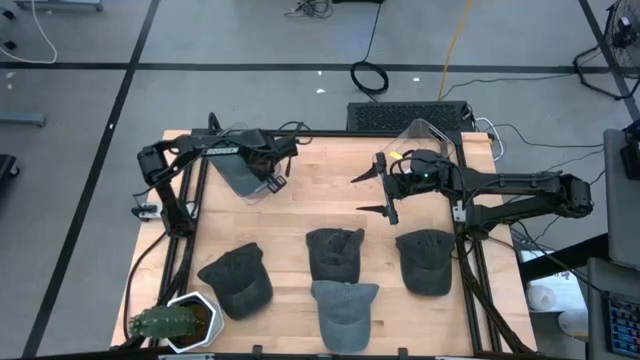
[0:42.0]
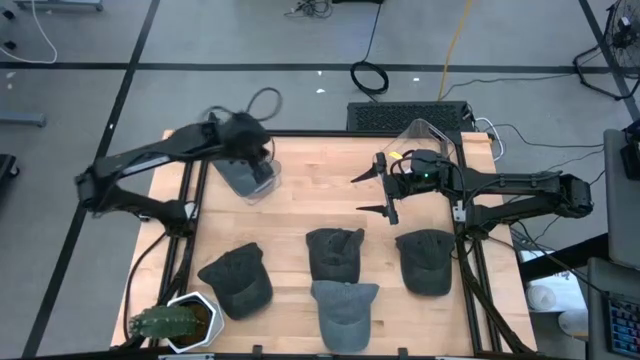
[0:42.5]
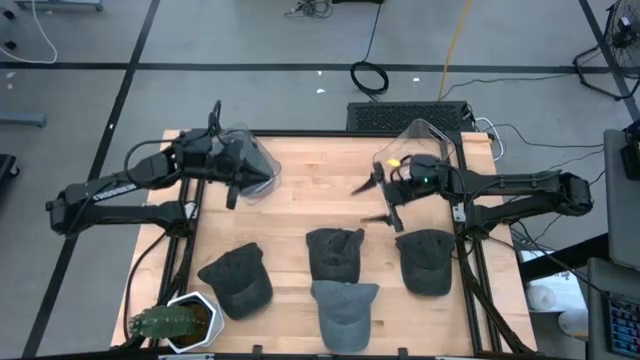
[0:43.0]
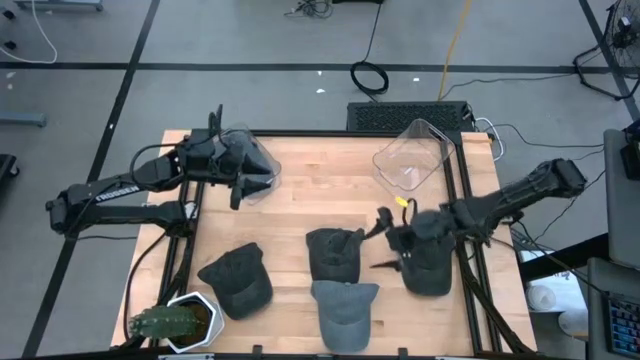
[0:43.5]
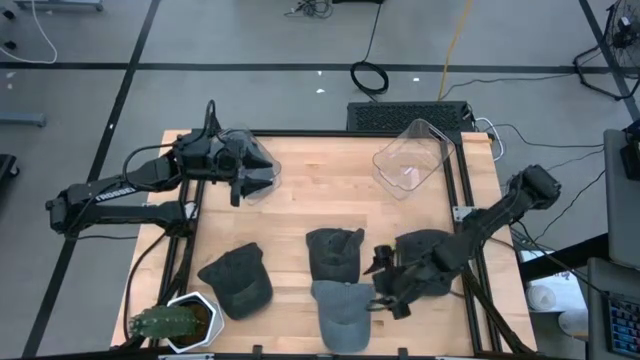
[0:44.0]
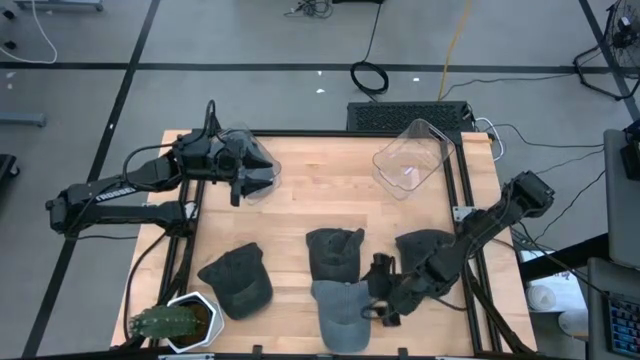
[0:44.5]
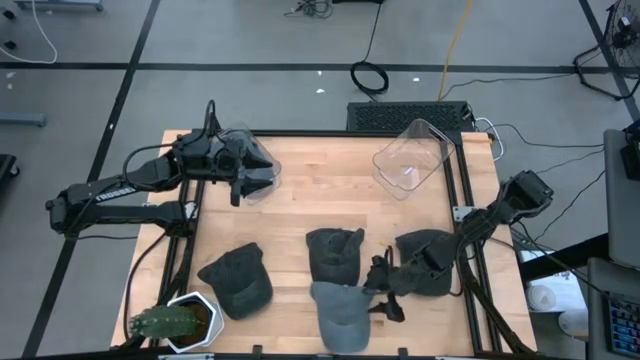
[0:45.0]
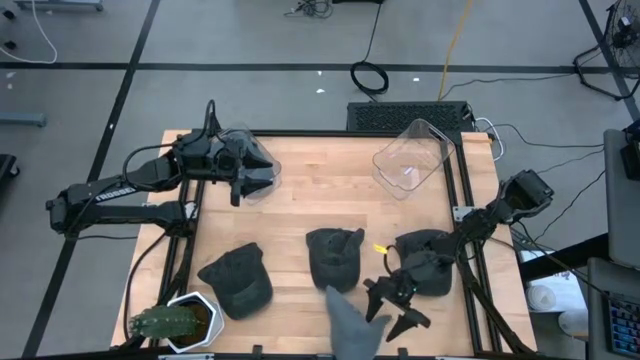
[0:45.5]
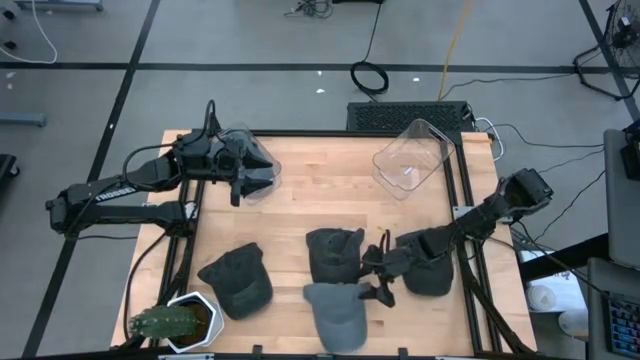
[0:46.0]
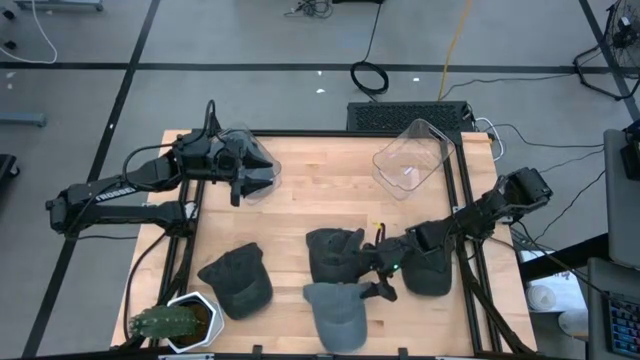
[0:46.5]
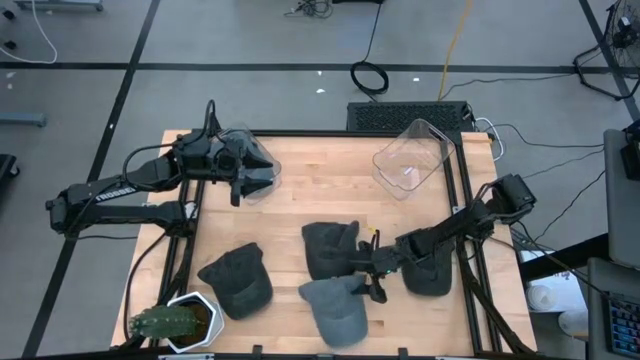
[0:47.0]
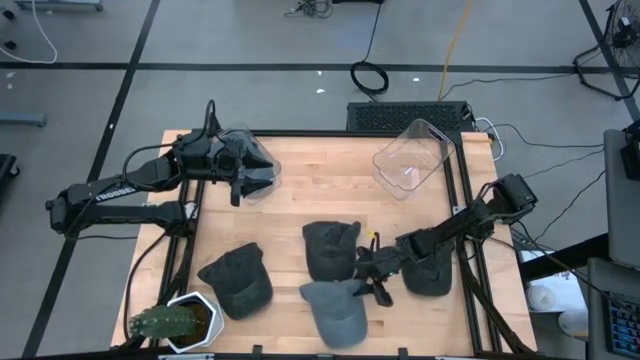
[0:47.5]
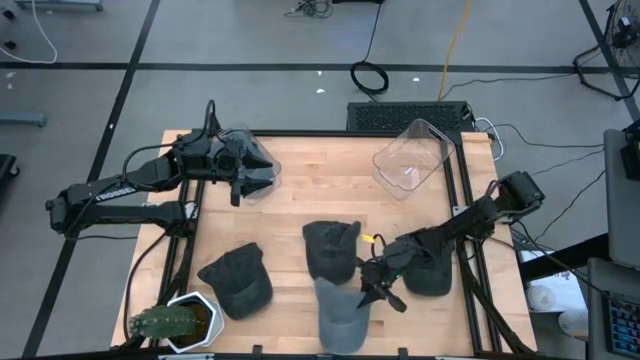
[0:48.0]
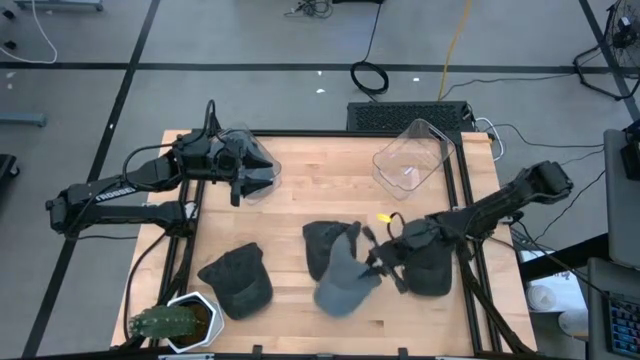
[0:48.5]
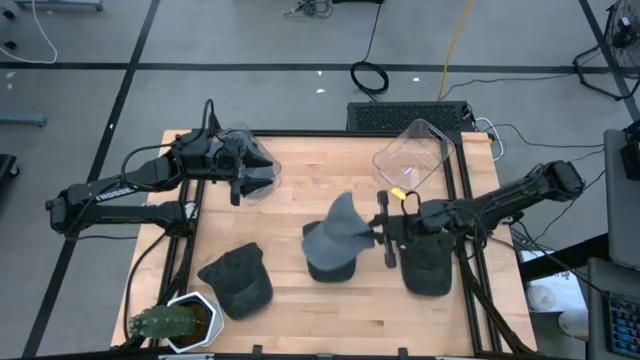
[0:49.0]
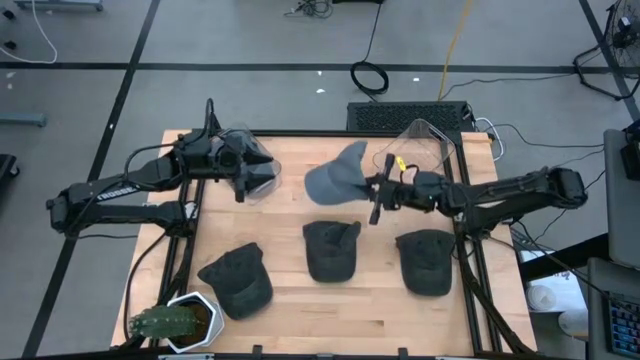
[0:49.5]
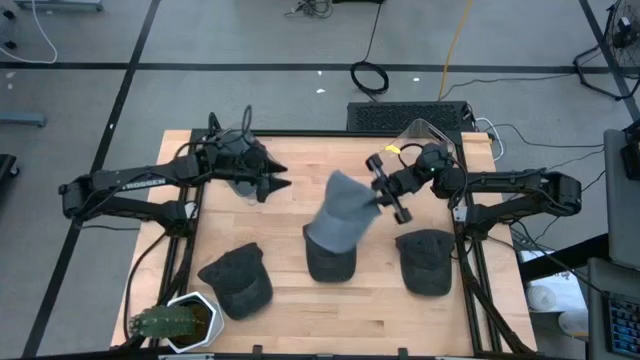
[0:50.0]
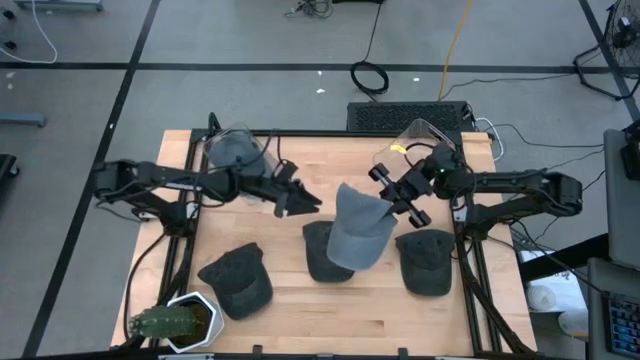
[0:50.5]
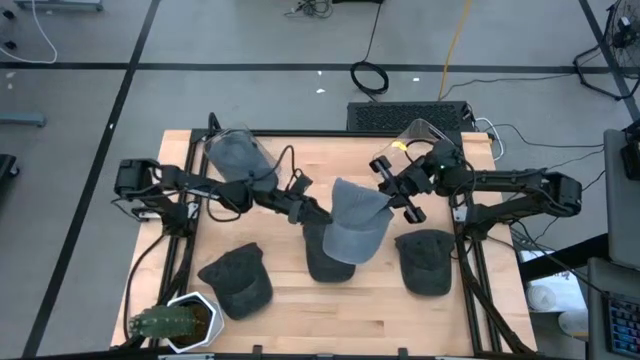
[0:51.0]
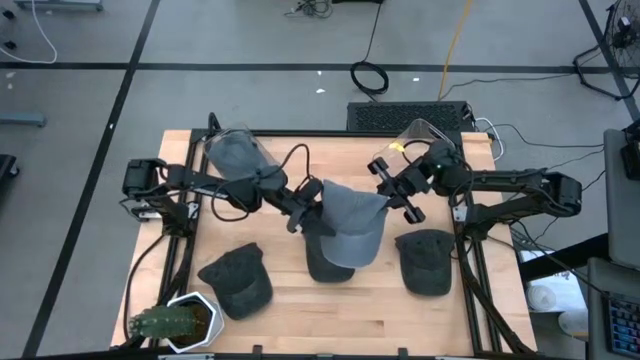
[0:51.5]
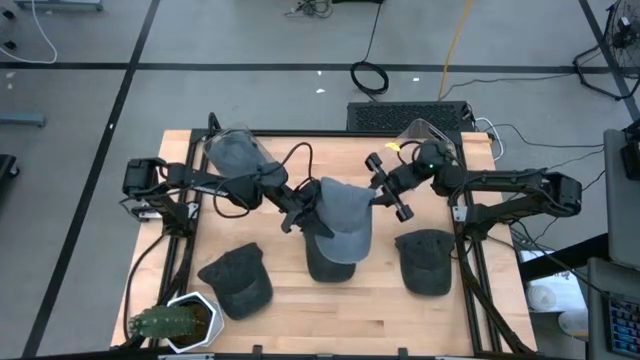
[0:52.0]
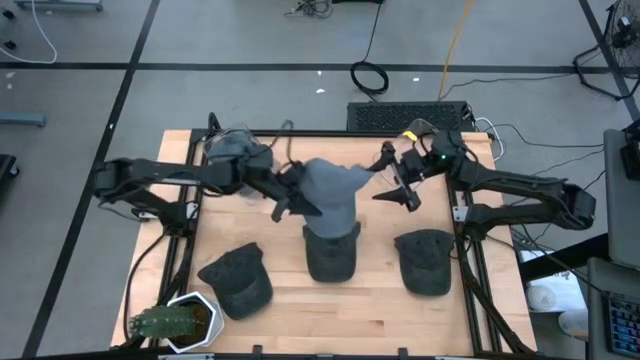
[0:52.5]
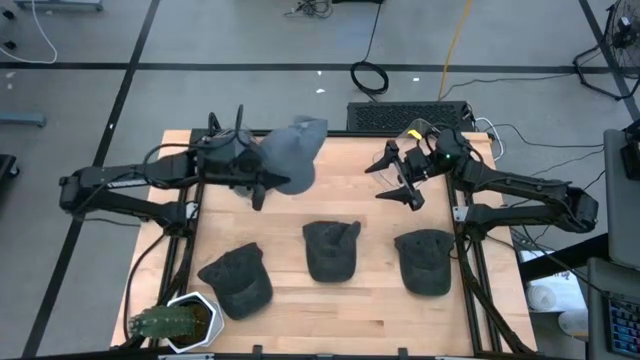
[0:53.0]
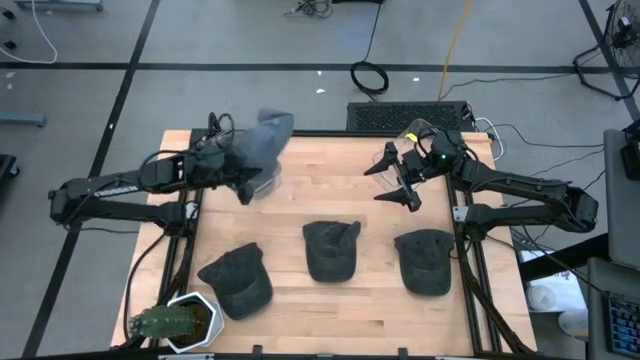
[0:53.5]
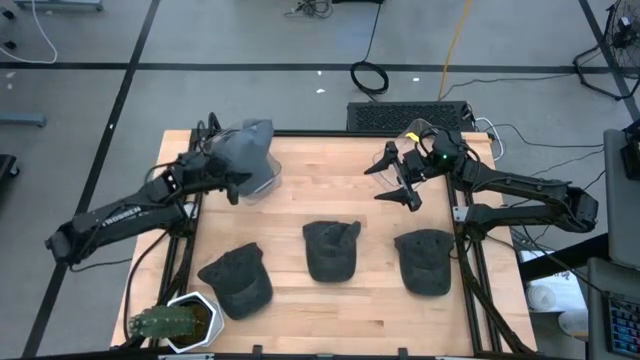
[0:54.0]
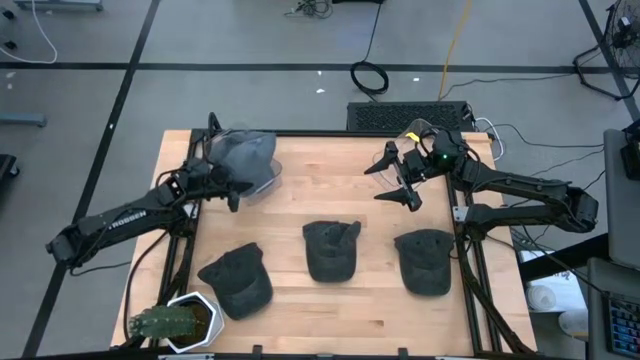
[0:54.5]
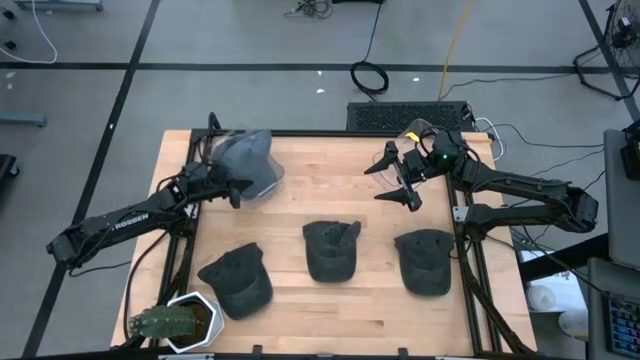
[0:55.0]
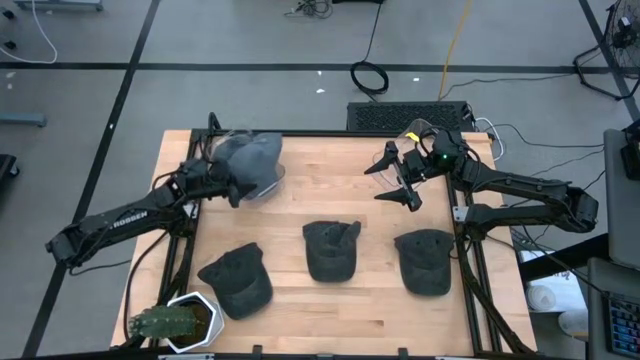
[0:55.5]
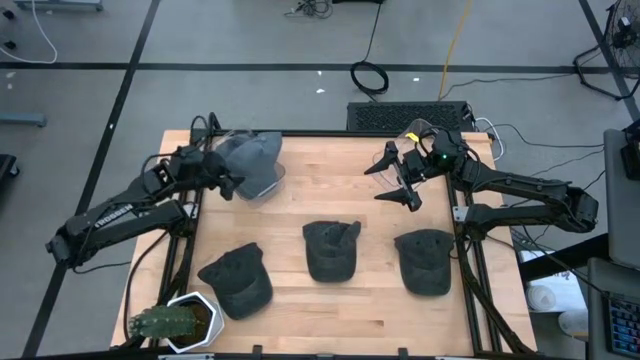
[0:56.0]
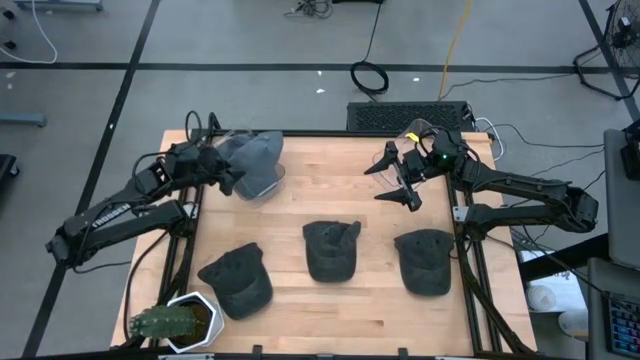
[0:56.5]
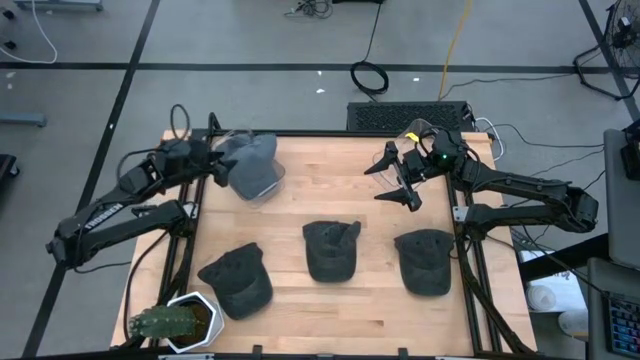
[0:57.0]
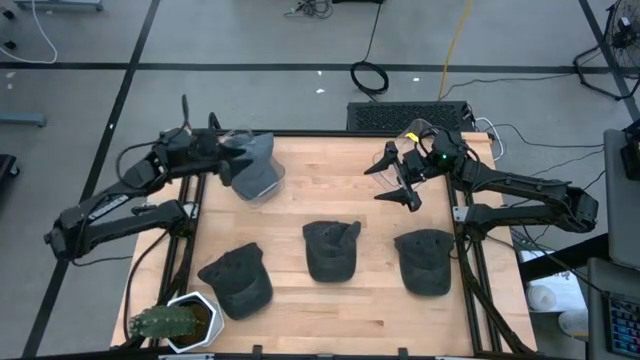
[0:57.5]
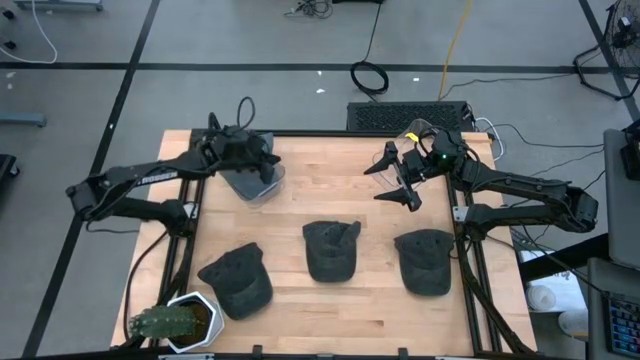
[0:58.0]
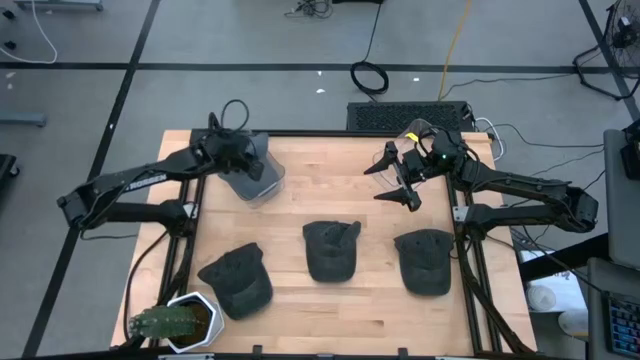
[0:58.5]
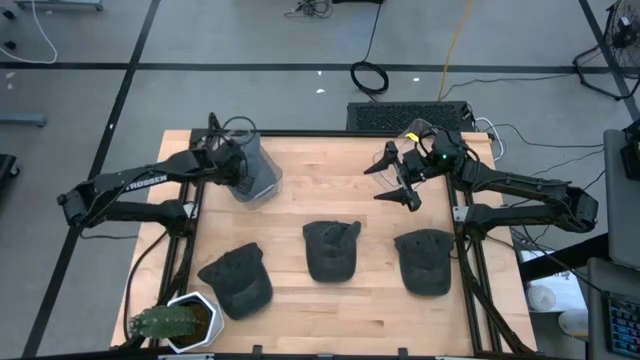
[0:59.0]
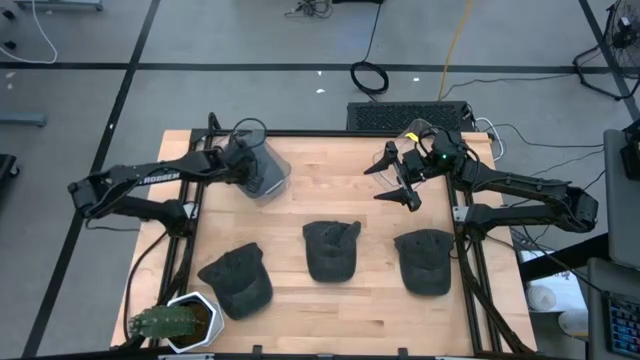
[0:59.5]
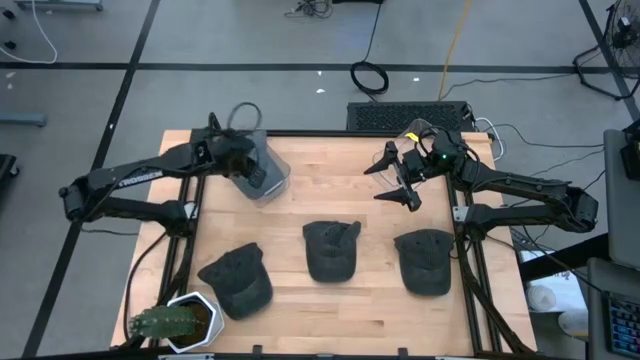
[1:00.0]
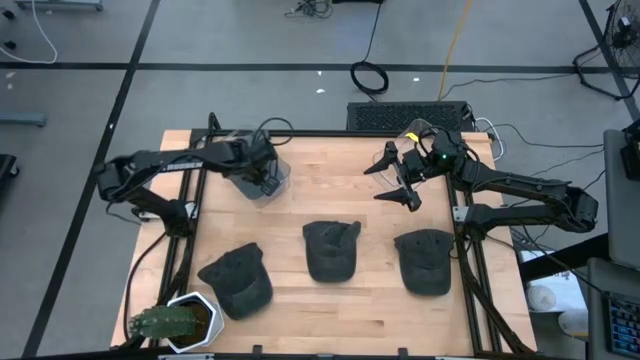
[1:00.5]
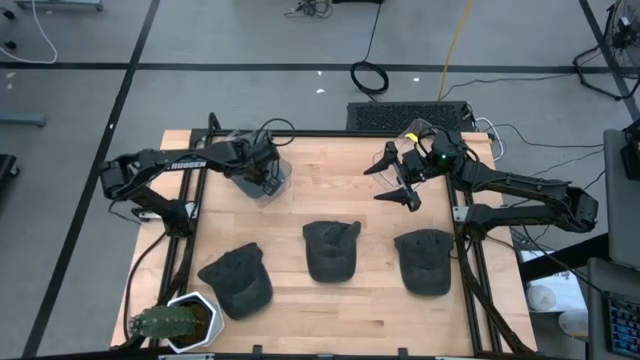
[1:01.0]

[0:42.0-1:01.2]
Task: Pick & Place hat
Put the blue cap into the left transparent bin
